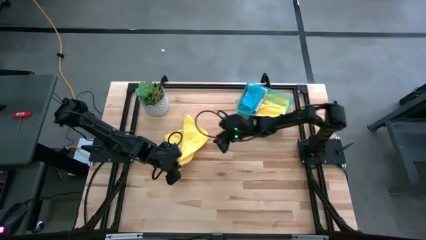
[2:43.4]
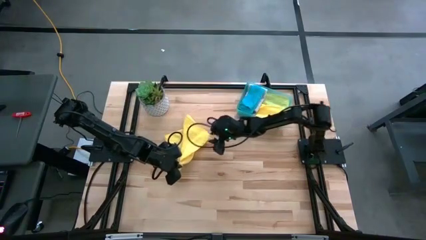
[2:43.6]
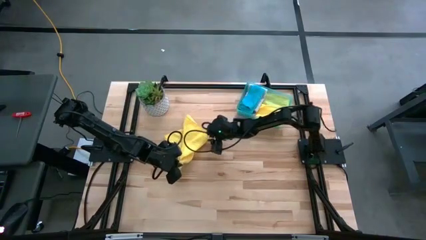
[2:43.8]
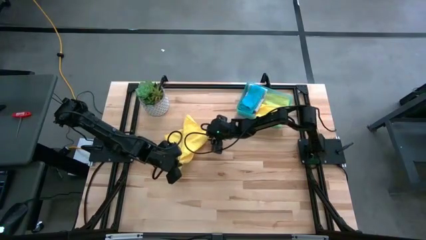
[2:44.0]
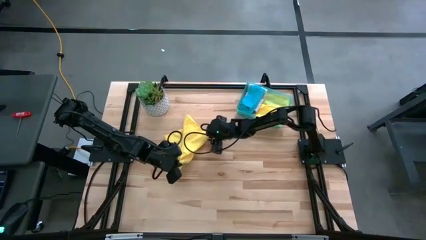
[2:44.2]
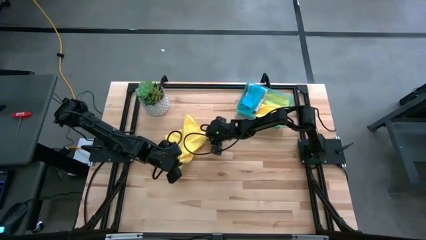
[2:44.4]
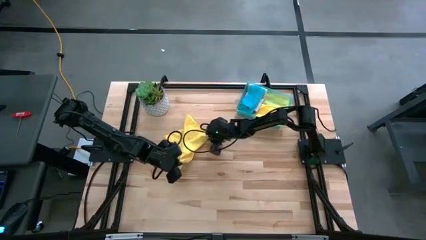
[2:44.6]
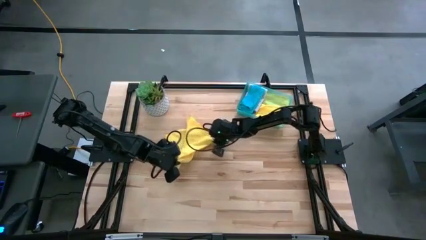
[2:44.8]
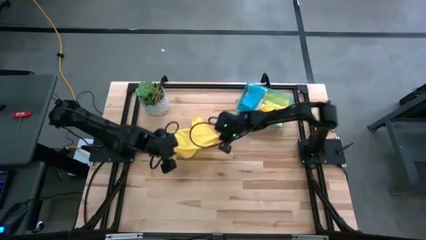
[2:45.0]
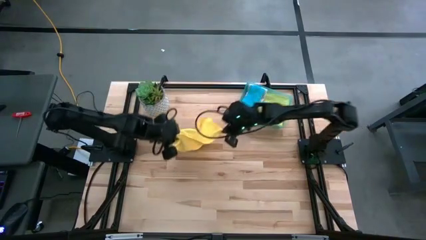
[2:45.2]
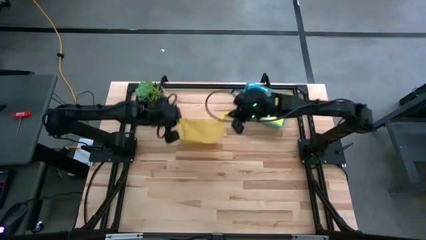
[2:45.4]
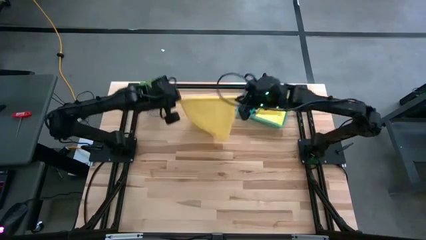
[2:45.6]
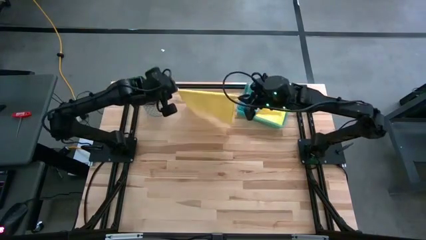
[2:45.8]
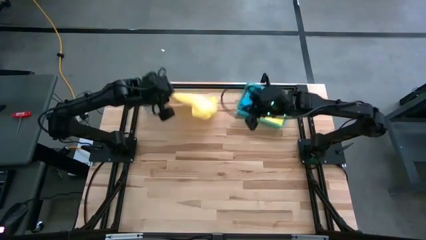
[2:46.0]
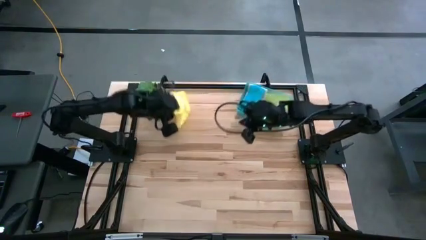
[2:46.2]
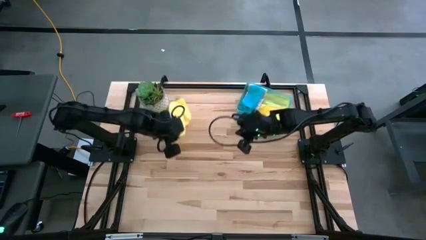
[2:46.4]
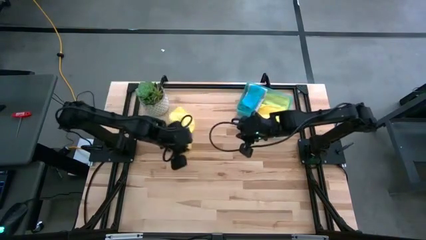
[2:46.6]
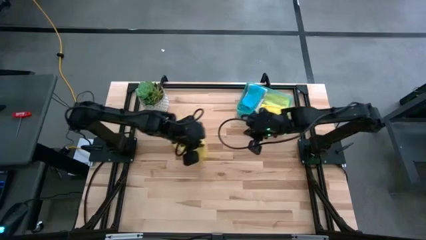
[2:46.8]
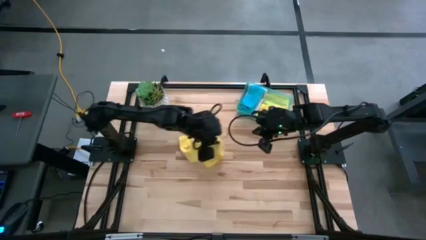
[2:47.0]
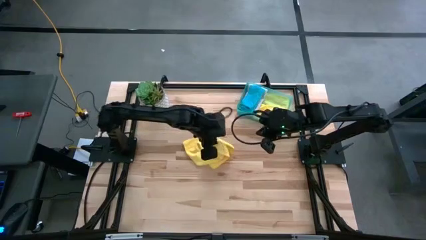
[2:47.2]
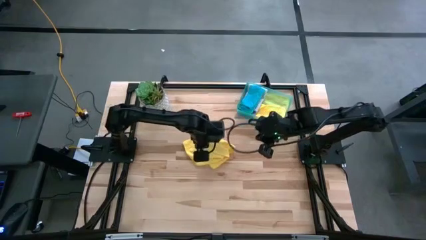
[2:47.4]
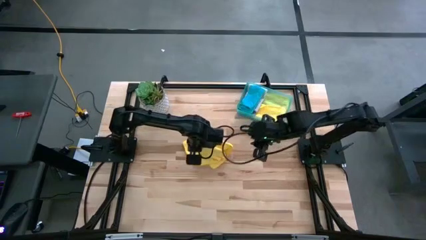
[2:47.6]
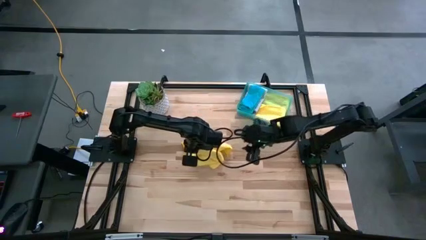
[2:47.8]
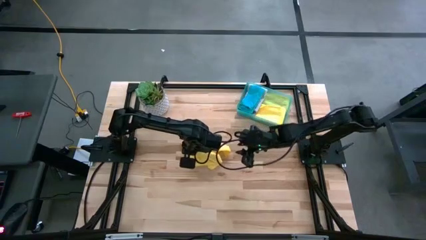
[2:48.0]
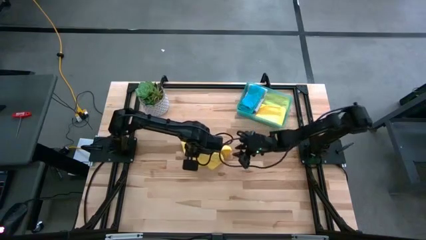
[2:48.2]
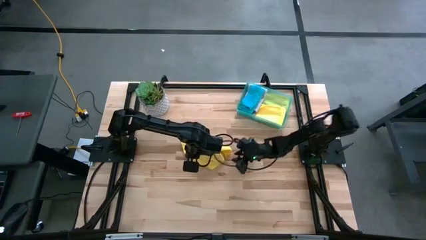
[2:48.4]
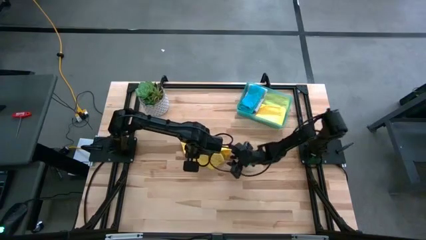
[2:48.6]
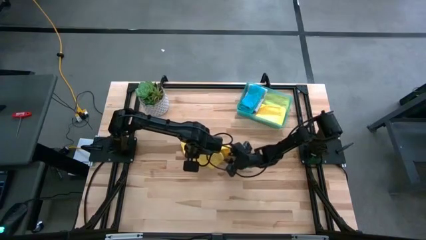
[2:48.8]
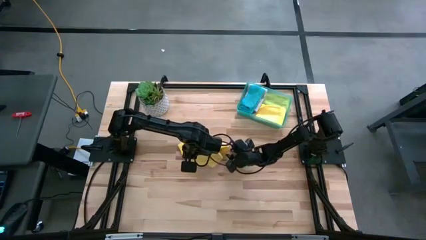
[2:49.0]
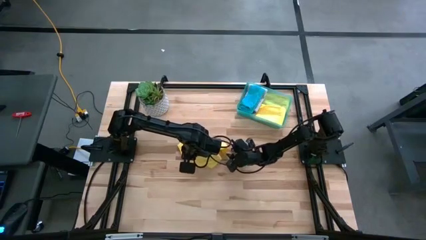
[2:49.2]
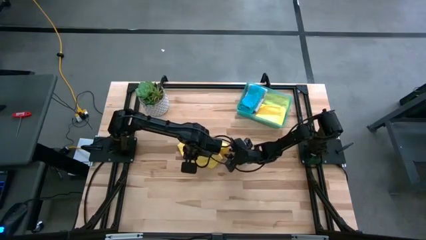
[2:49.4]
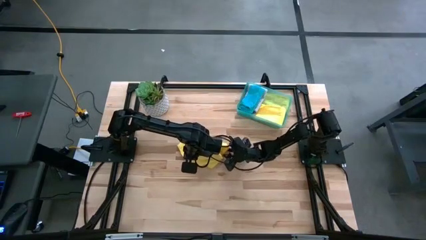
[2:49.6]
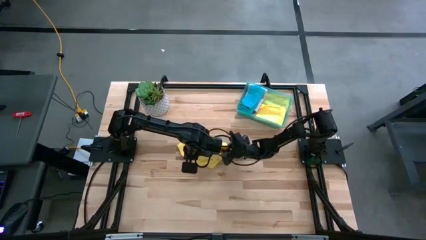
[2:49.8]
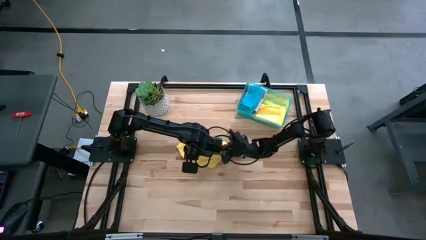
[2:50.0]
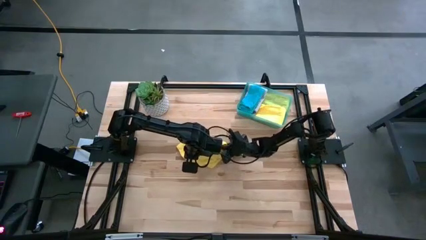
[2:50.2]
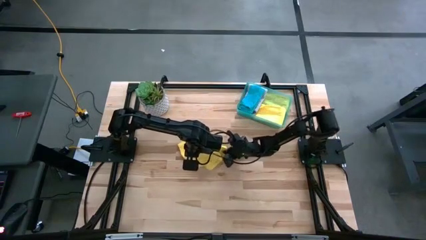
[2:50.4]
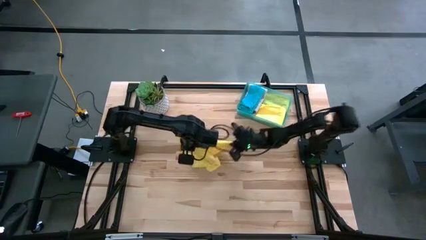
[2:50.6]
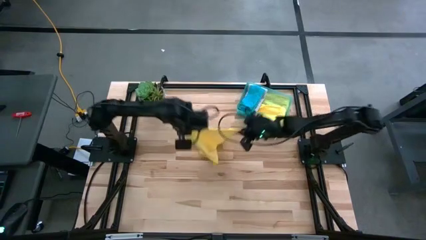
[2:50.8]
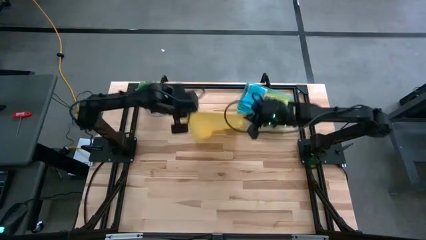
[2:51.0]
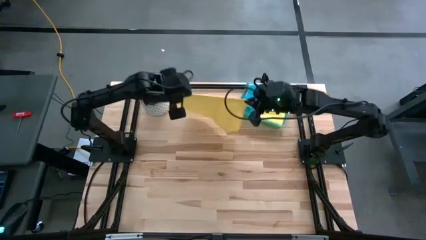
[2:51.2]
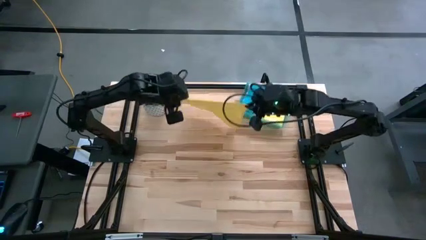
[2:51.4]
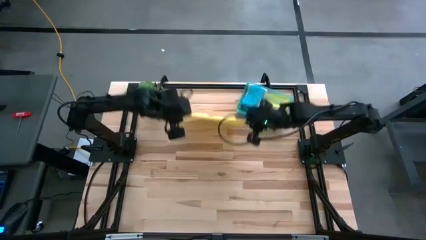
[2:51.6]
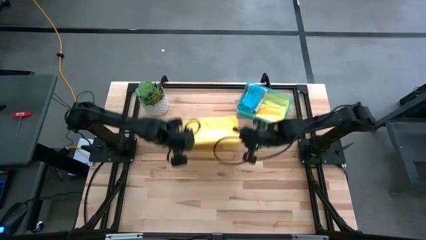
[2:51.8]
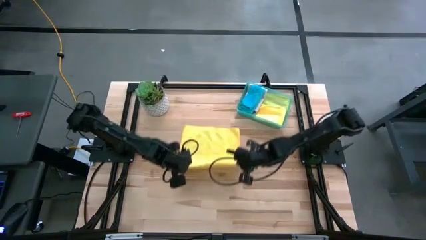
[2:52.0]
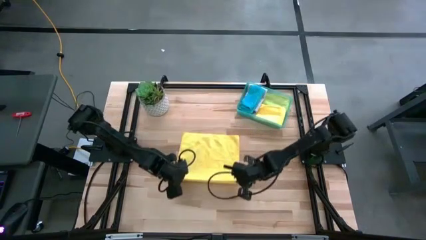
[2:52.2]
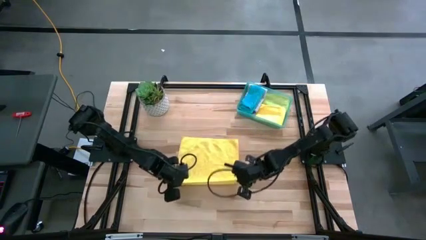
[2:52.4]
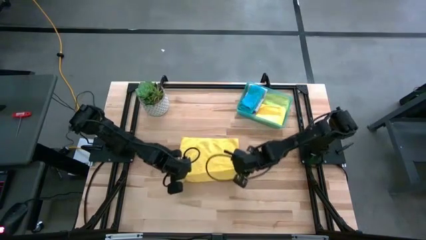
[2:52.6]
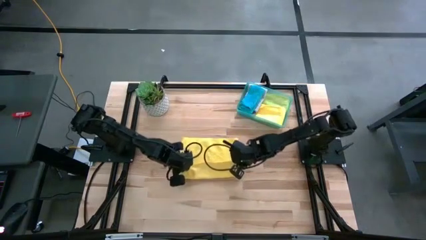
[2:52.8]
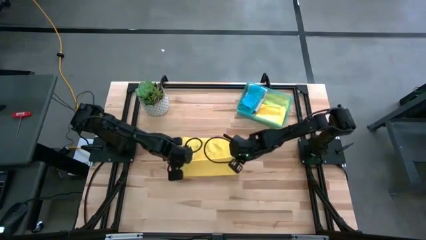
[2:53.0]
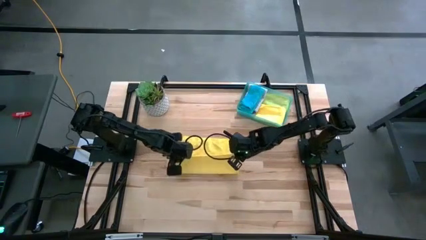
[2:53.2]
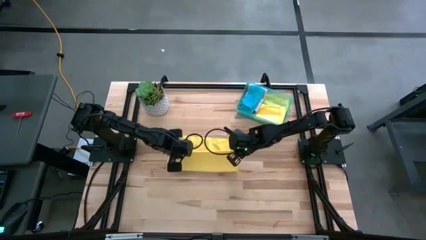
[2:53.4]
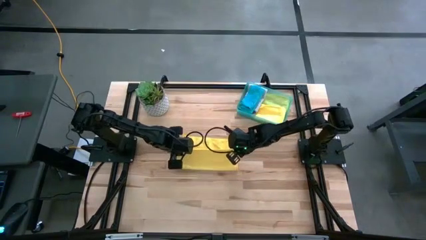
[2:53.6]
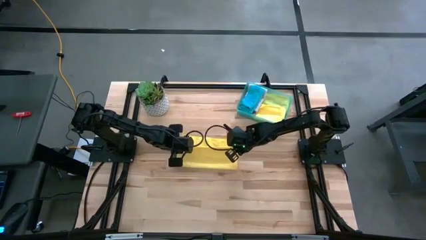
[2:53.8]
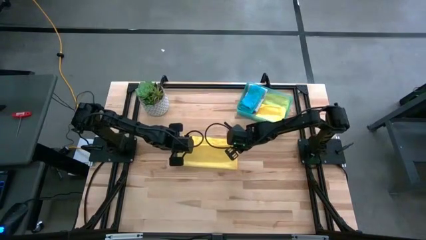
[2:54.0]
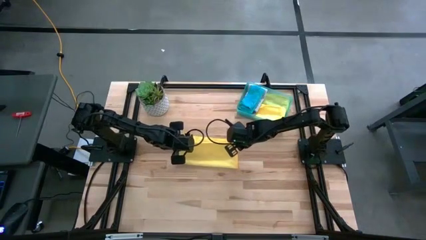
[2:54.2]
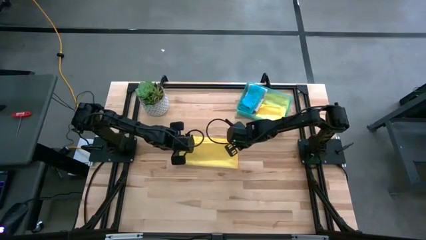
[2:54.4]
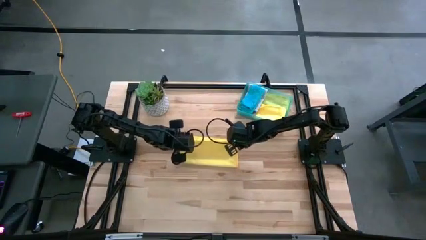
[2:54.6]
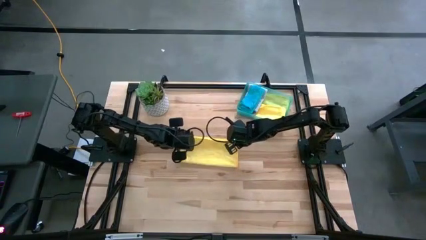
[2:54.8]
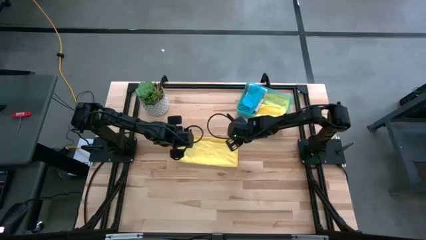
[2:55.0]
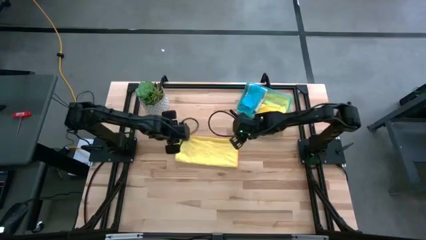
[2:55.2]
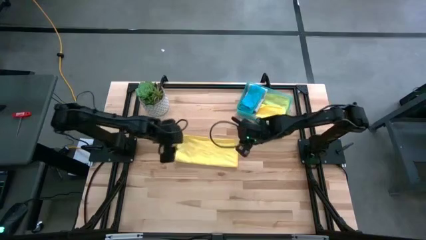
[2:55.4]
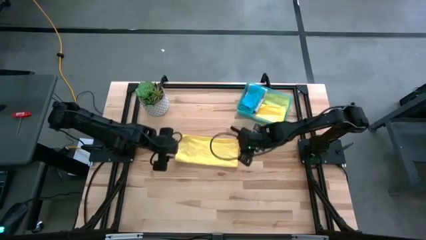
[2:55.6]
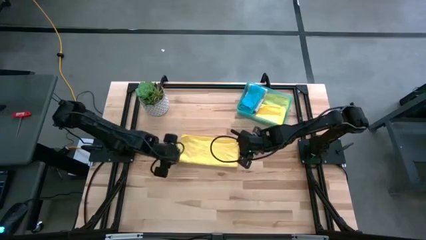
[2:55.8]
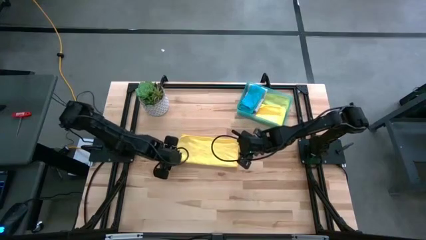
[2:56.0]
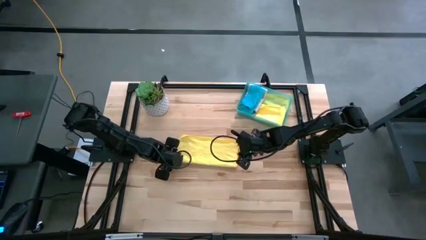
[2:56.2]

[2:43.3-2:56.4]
Task: Fold microfiber towels
Fold the yellow towel
